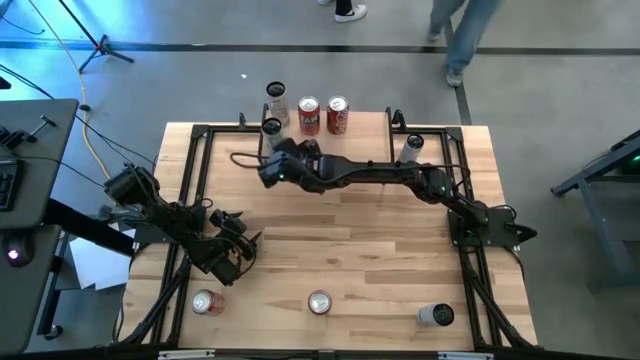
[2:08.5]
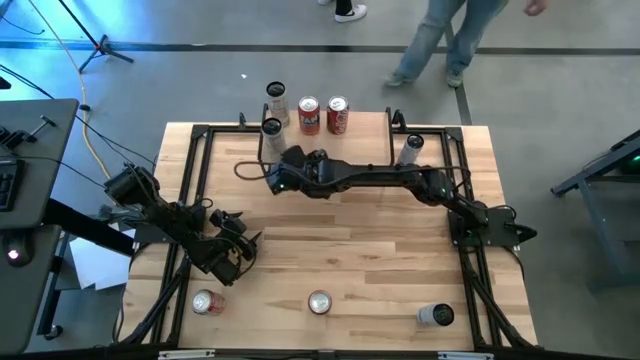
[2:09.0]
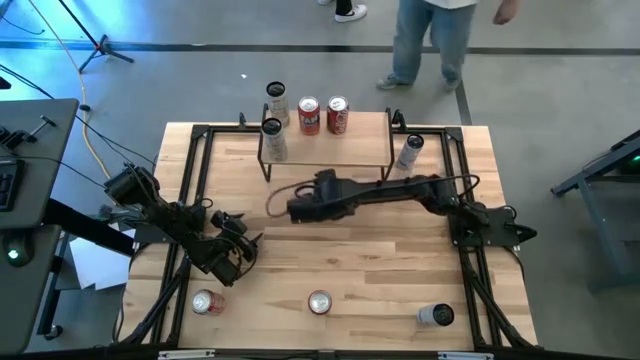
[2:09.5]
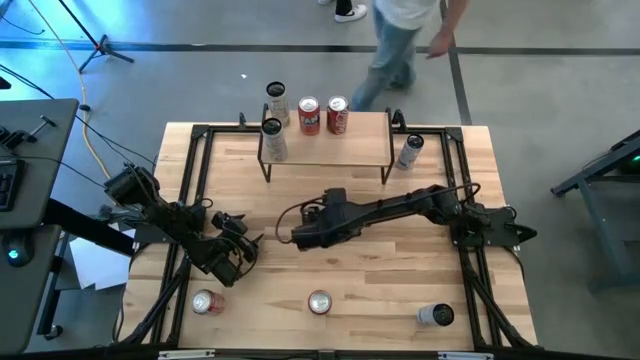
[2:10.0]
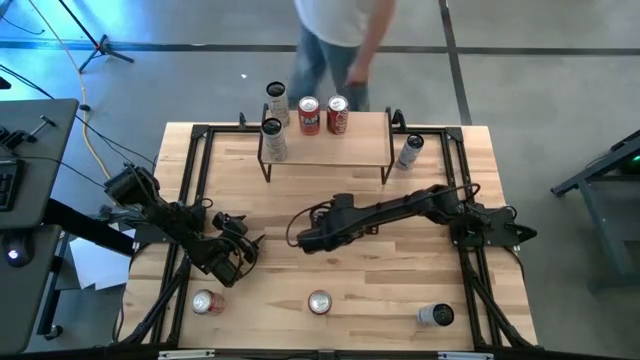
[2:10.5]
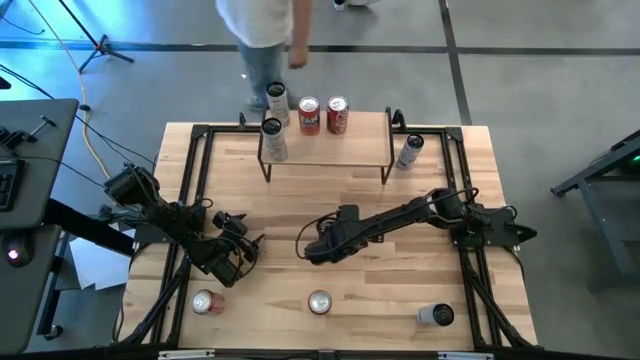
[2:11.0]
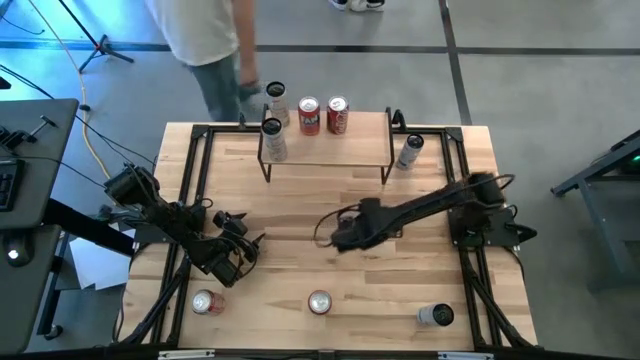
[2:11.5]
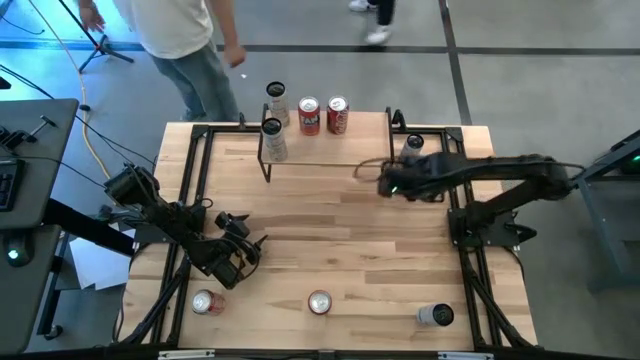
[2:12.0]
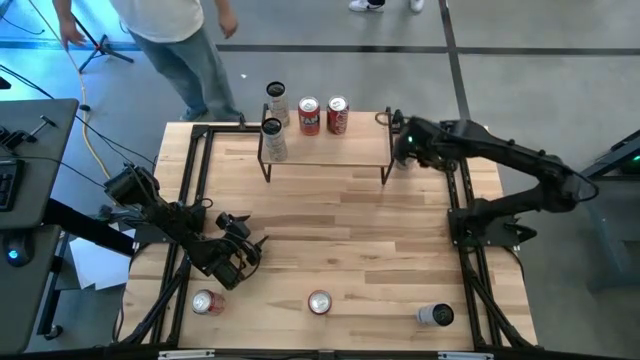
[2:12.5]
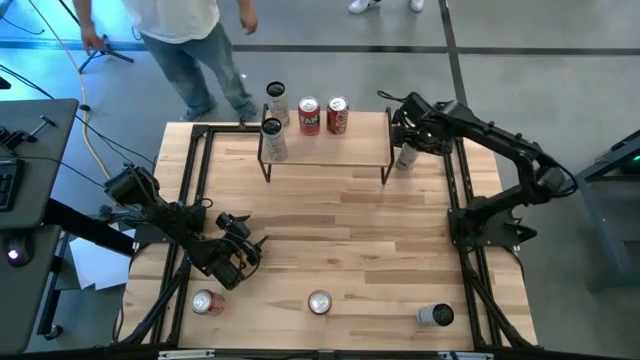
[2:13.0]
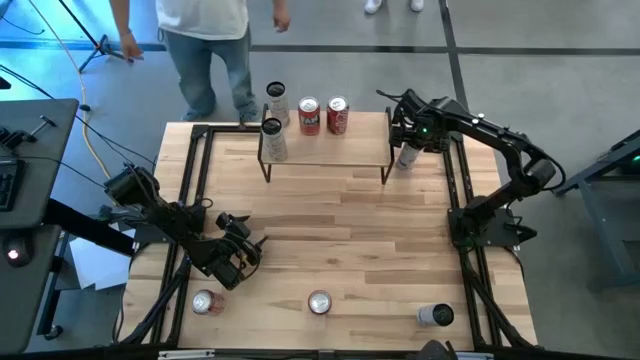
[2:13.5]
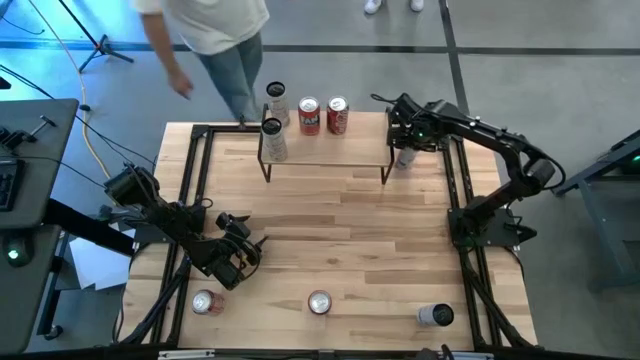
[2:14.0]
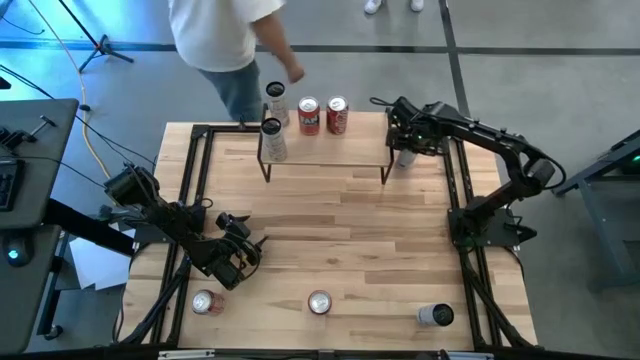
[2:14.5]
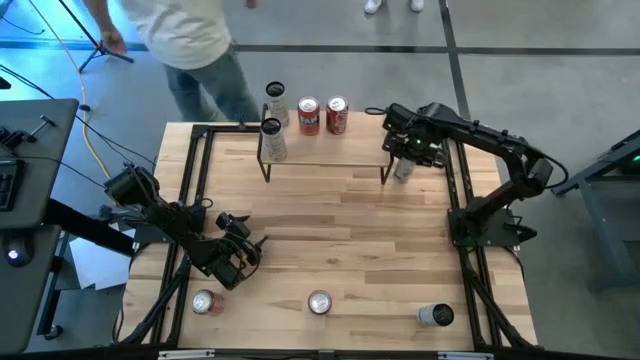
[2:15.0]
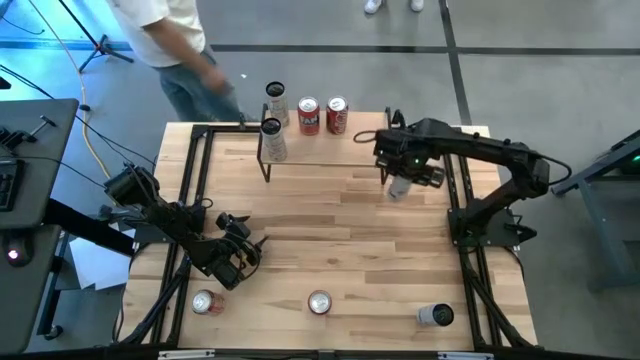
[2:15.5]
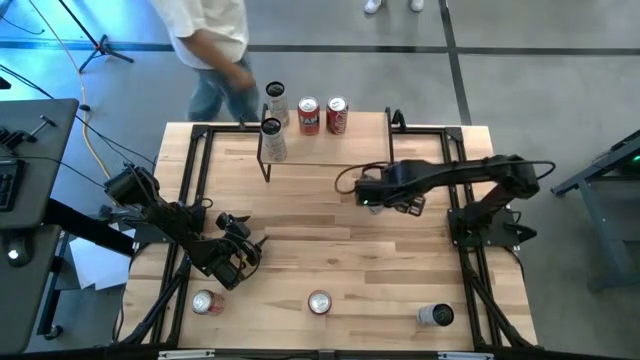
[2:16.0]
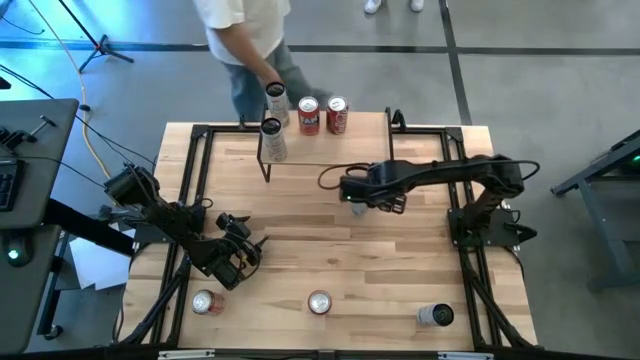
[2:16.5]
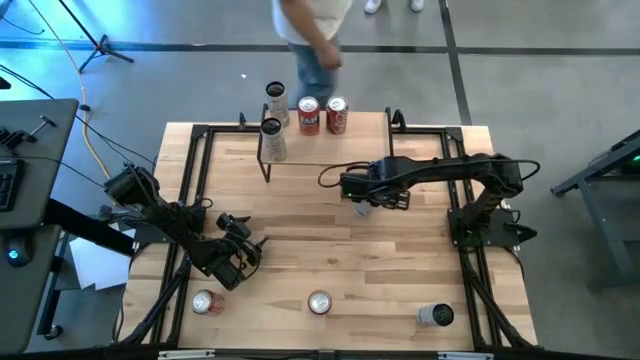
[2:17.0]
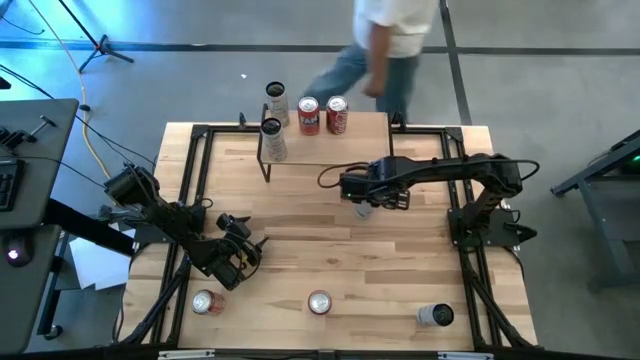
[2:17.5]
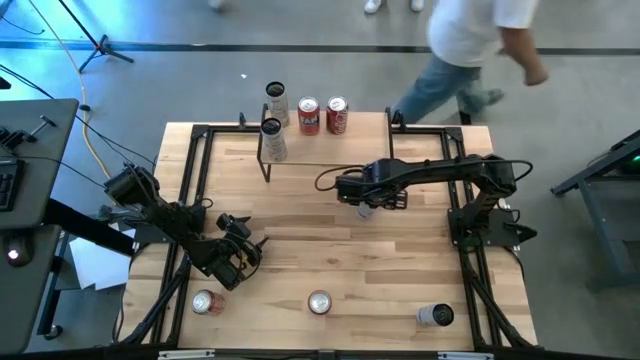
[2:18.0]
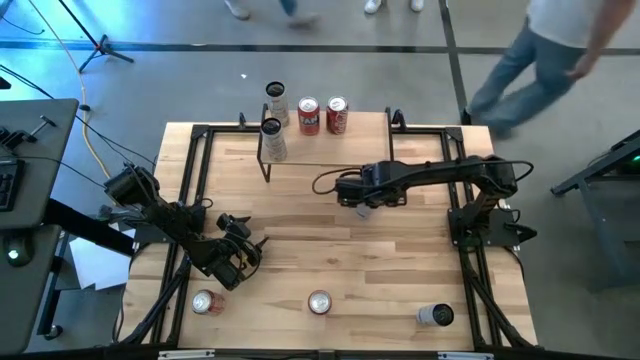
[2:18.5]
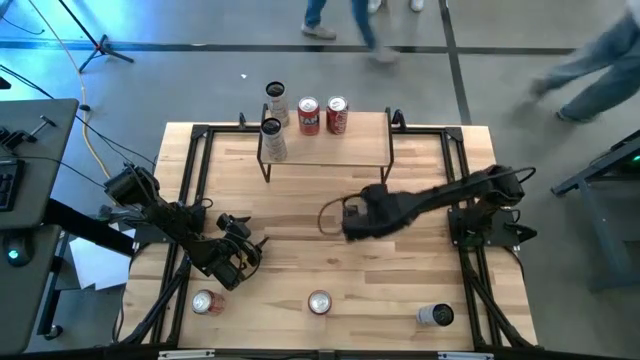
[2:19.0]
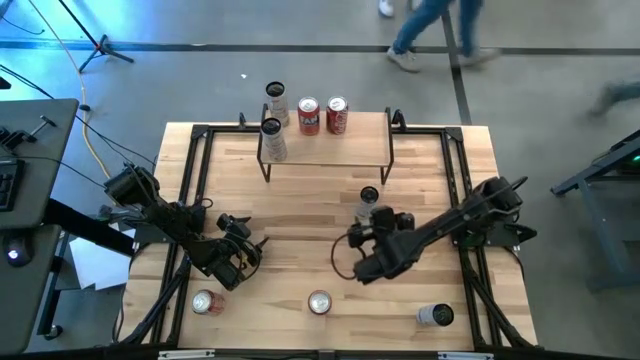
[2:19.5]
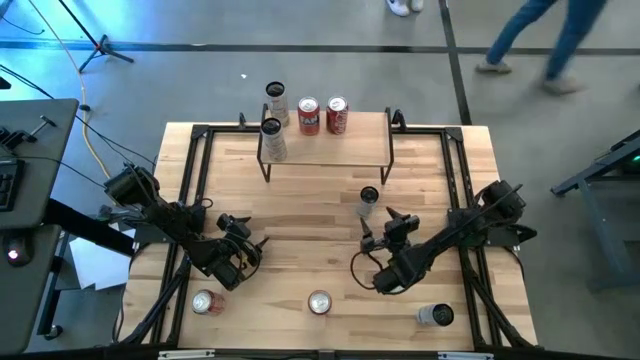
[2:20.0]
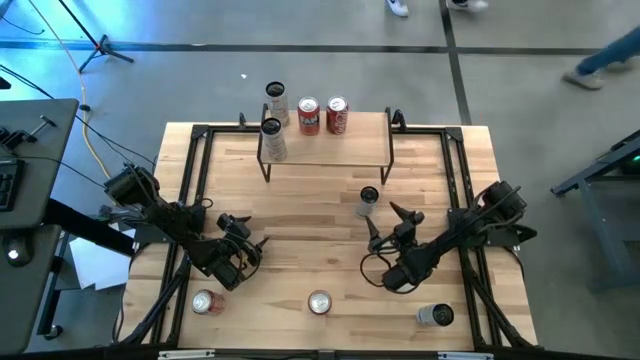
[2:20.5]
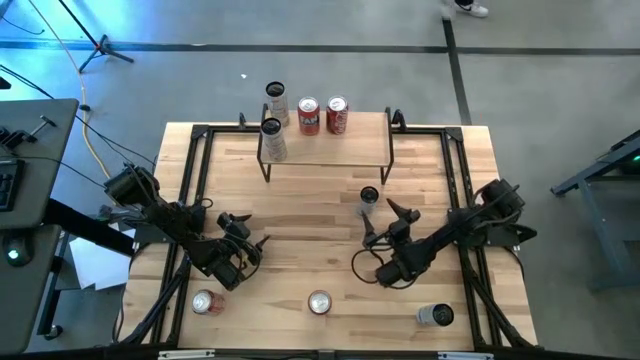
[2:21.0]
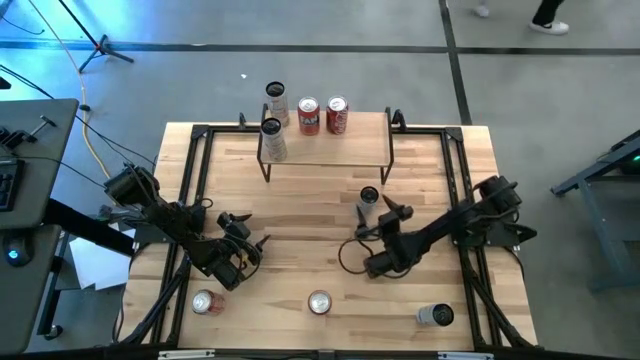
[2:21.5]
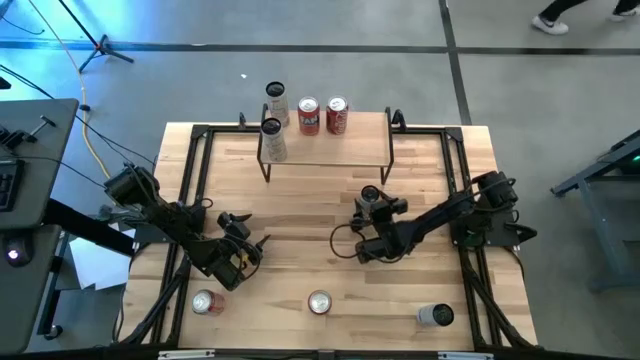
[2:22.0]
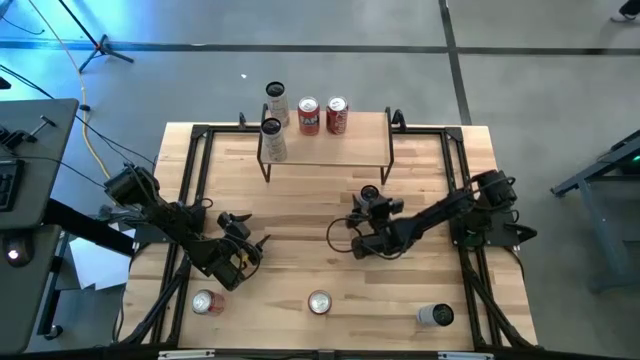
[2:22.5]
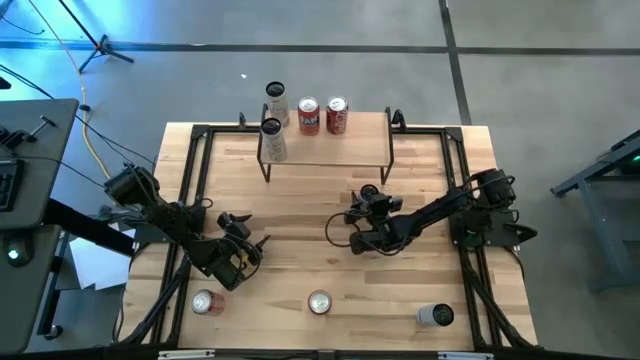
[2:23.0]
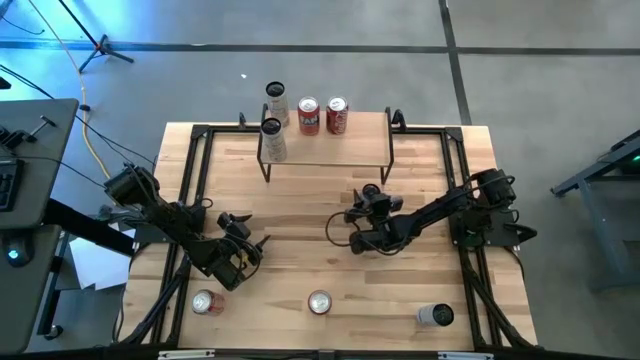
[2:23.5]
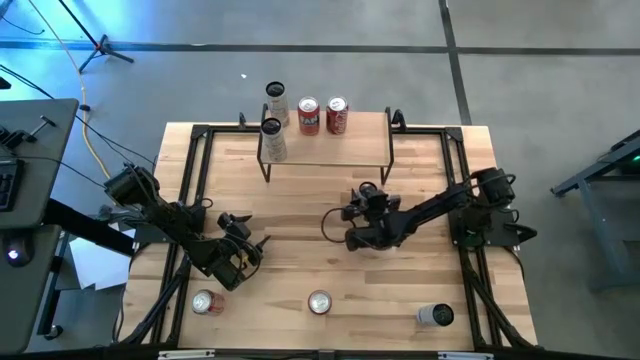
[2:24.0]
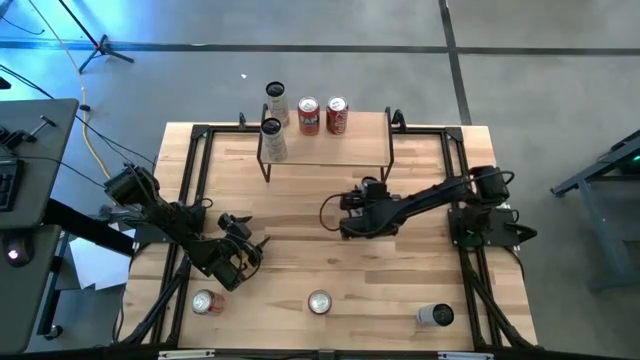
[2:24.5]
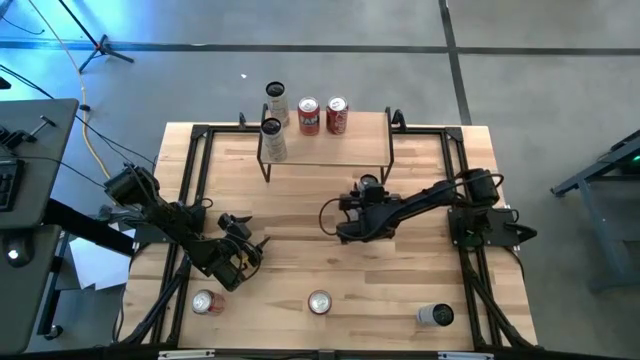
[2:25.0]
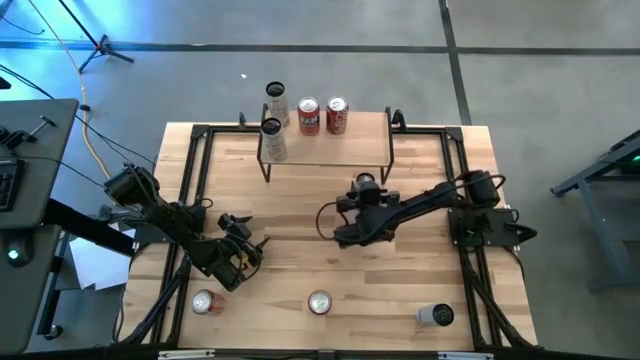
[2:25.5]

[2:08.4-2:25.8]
Task: Place canned beverage on shelf
Put the white and blue soda can on the shelf

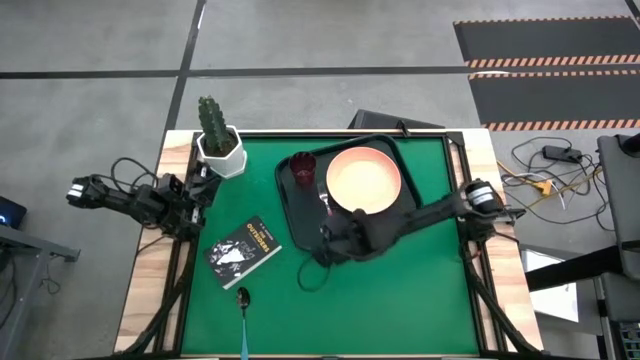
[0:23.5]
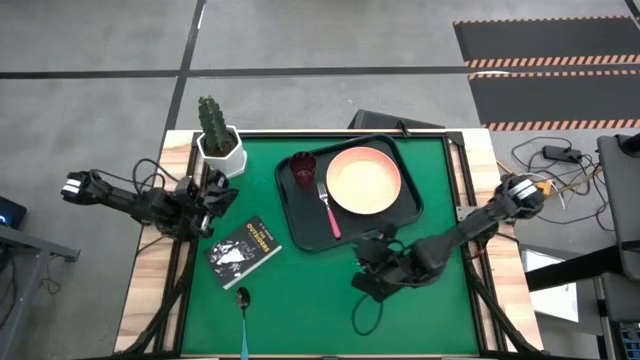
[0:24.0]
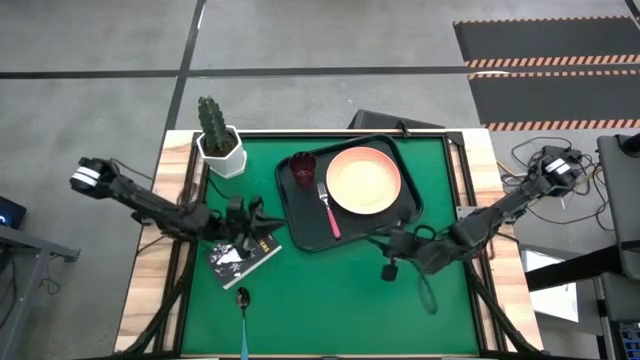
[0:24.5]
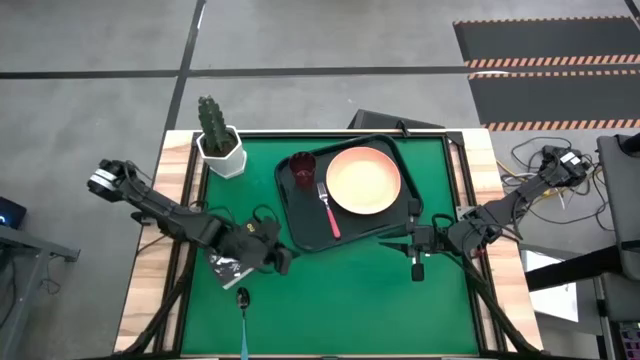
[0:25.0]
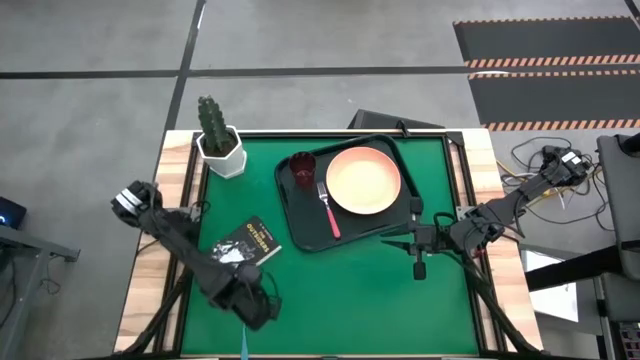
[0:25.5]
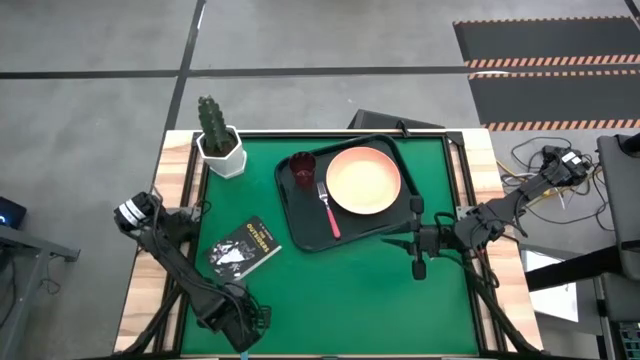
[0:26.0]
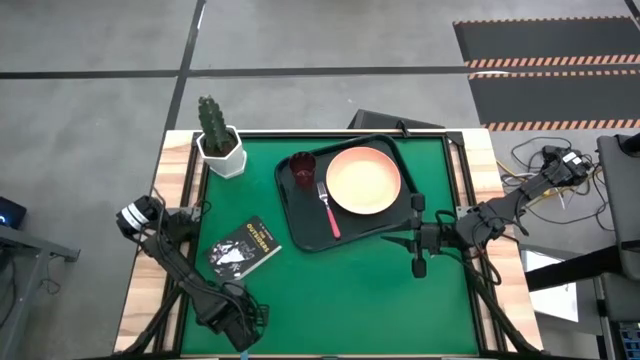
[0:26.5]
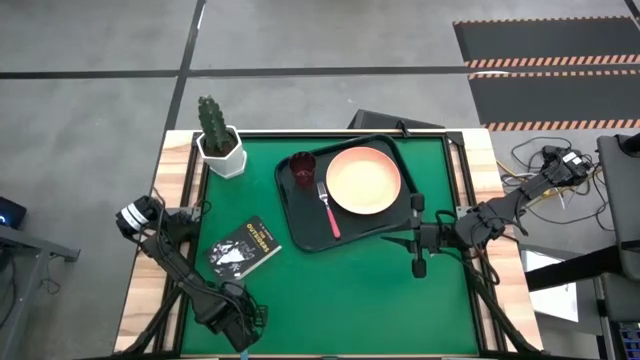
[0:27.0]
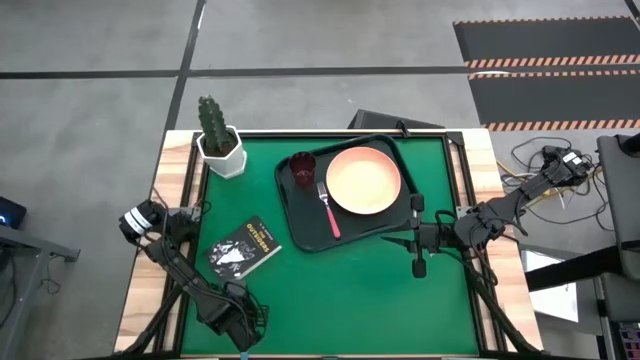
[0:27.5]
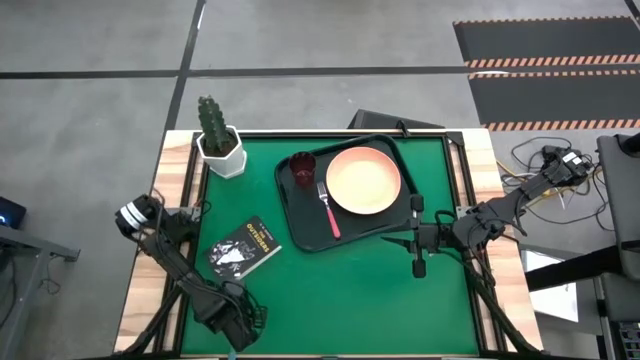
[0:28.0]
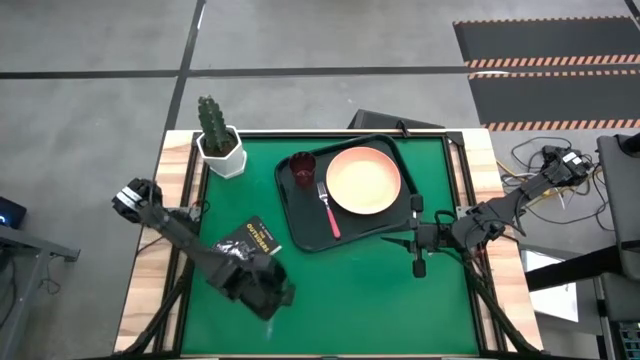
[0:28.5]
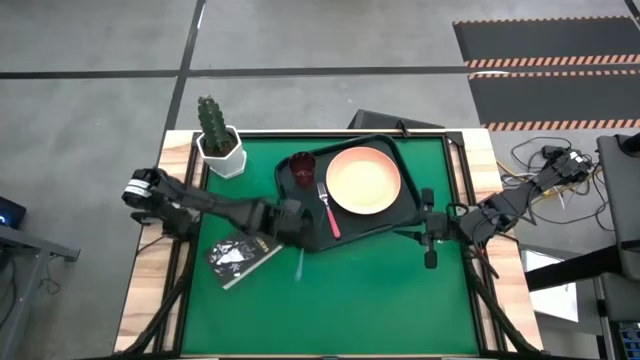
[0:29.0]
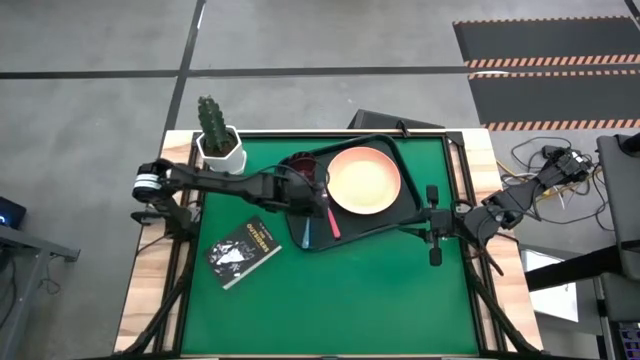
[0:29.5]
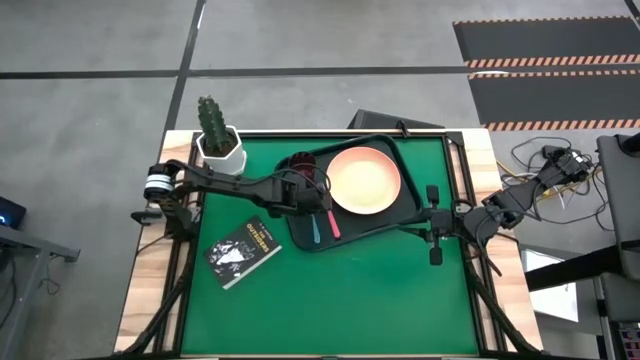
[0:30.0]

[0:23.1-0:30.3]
Task: Pick and place plate/cup/fork/spoon on tray
Put the blue spoon on the black serving tray to the left of the pink fork
